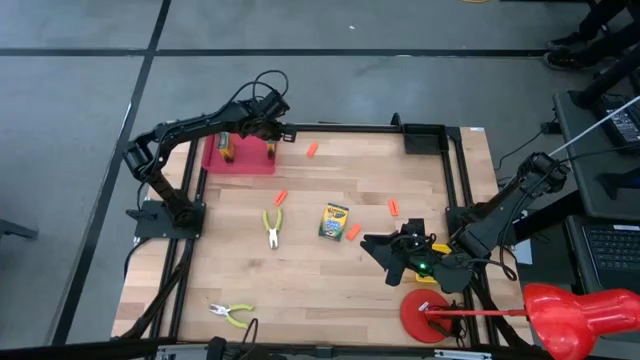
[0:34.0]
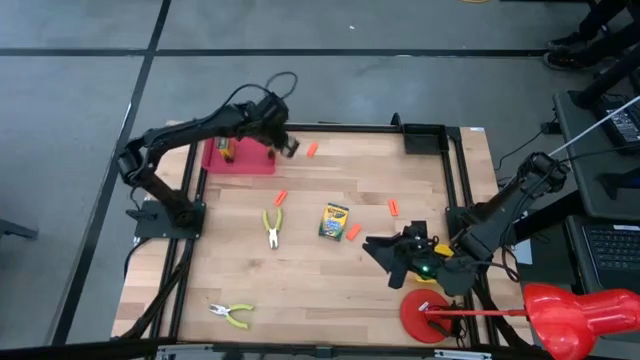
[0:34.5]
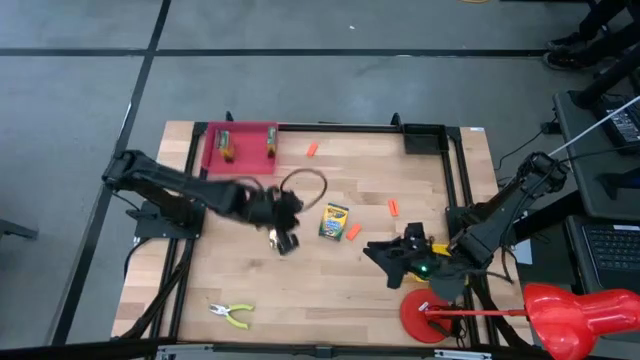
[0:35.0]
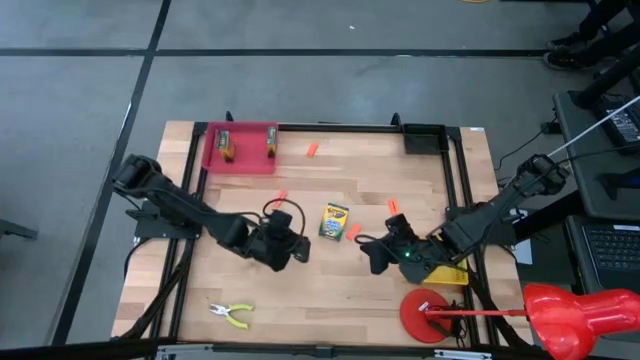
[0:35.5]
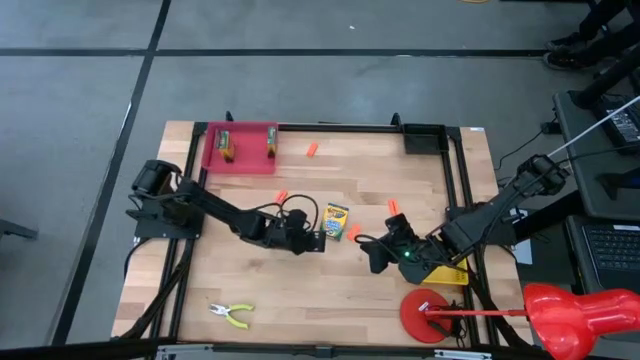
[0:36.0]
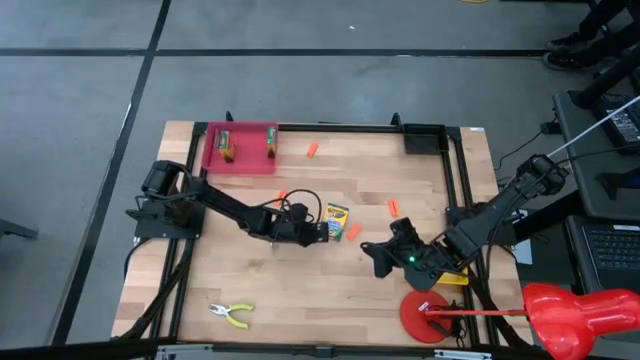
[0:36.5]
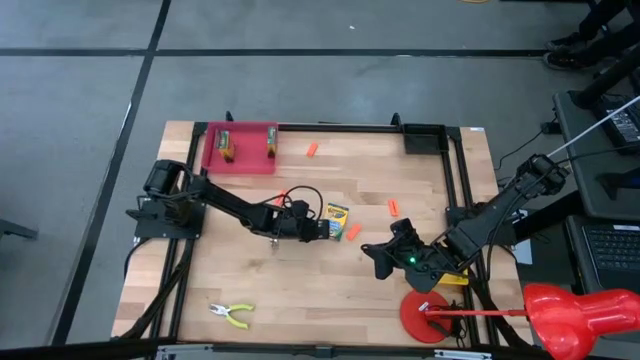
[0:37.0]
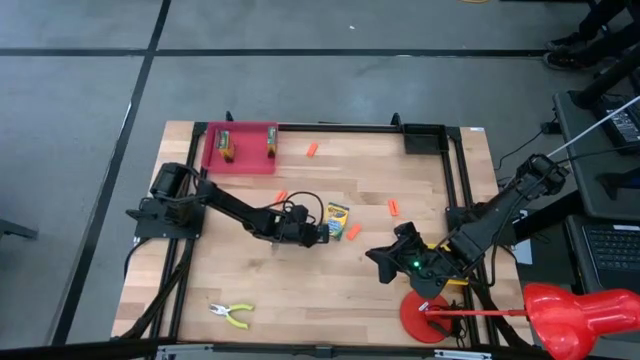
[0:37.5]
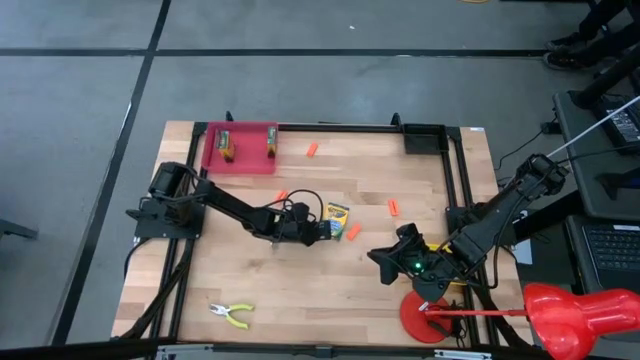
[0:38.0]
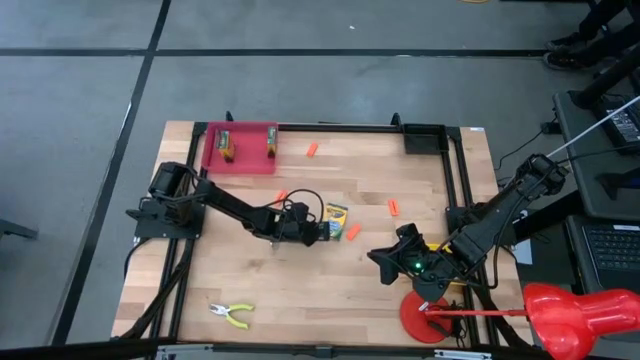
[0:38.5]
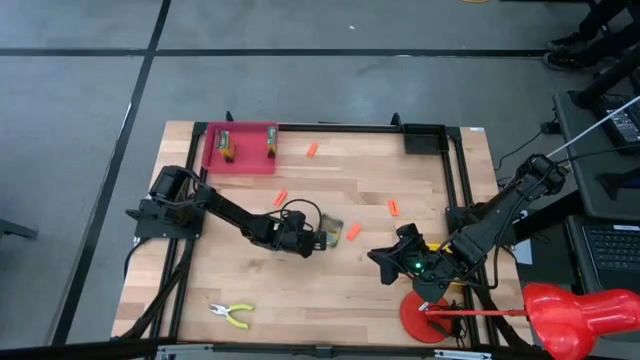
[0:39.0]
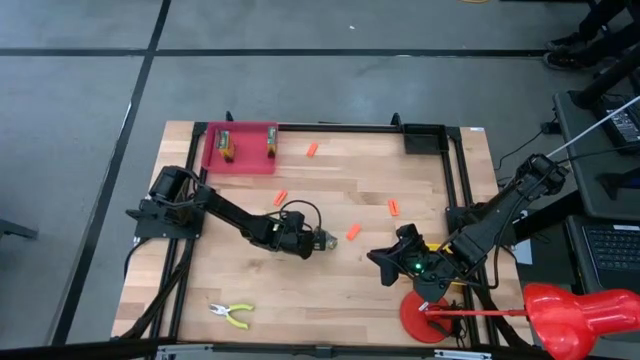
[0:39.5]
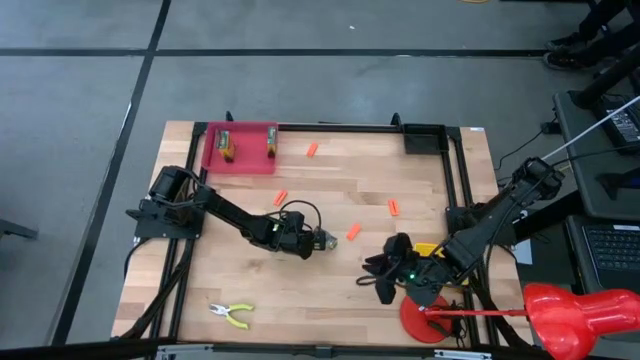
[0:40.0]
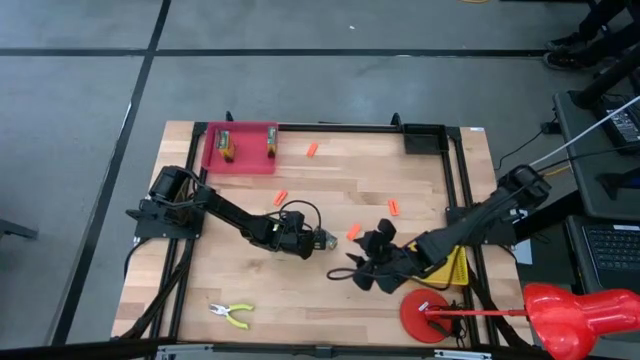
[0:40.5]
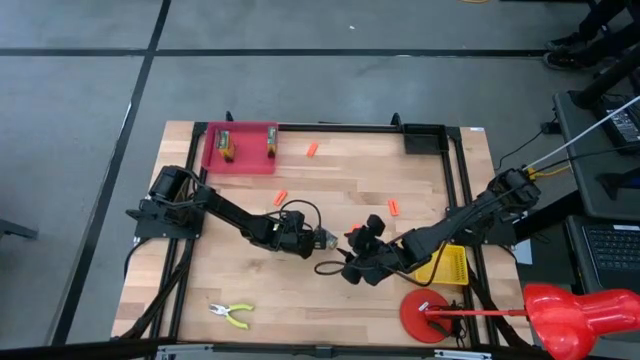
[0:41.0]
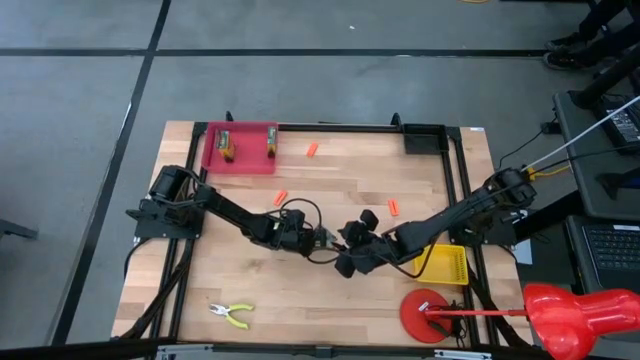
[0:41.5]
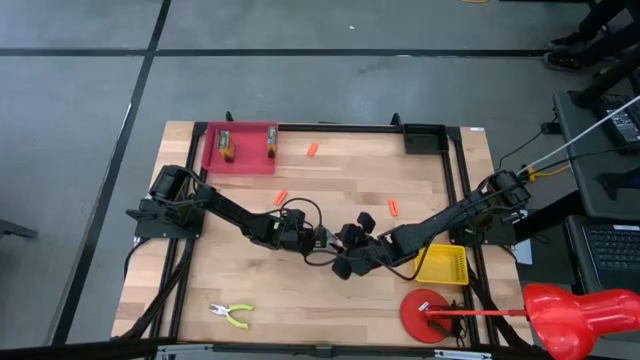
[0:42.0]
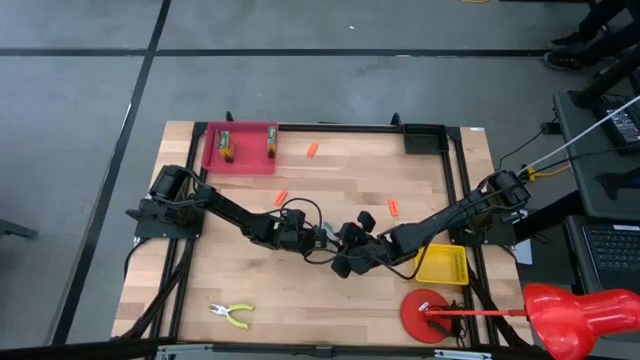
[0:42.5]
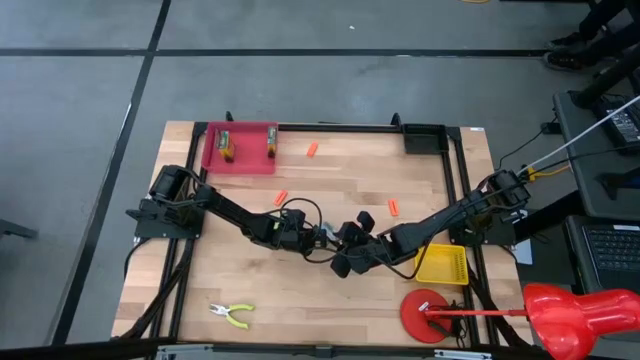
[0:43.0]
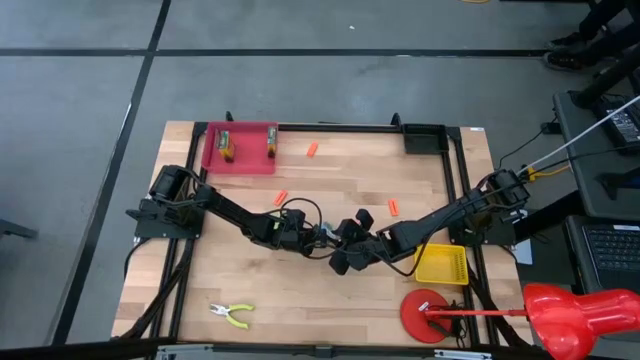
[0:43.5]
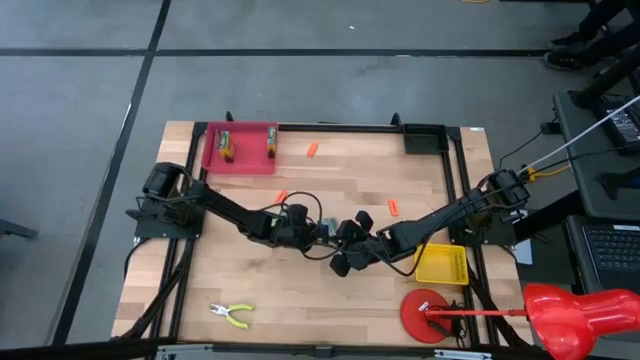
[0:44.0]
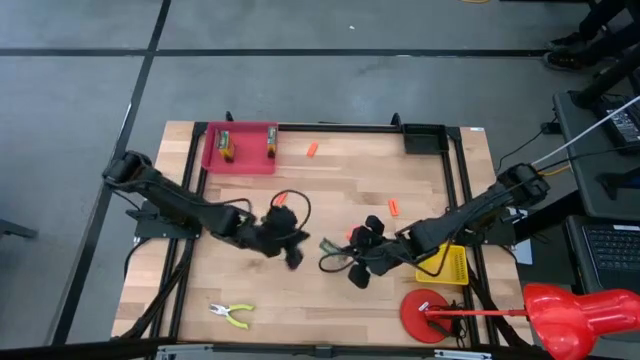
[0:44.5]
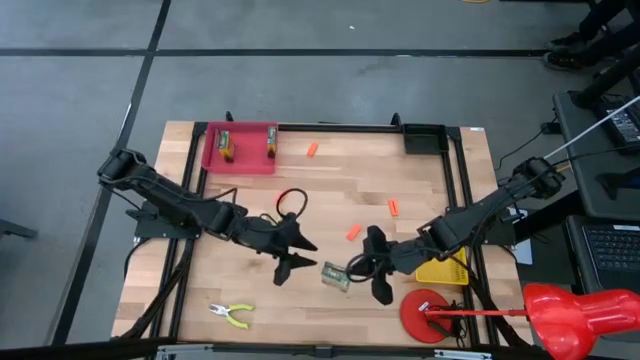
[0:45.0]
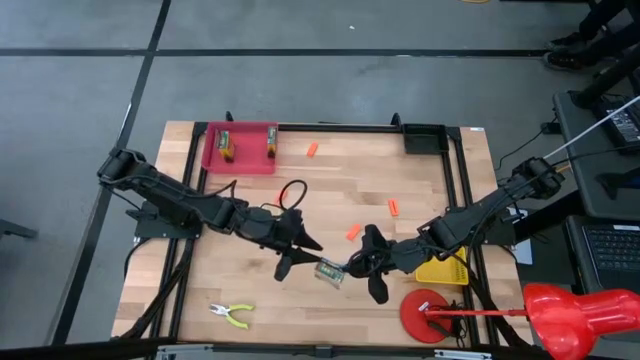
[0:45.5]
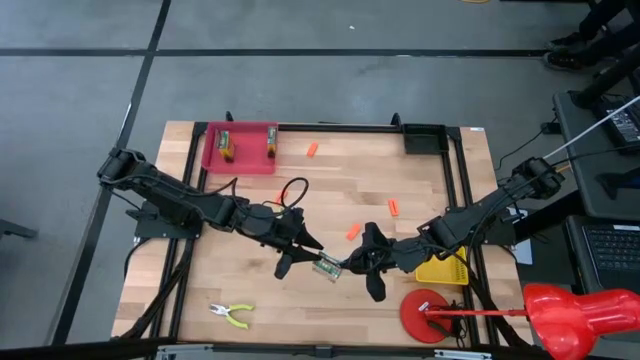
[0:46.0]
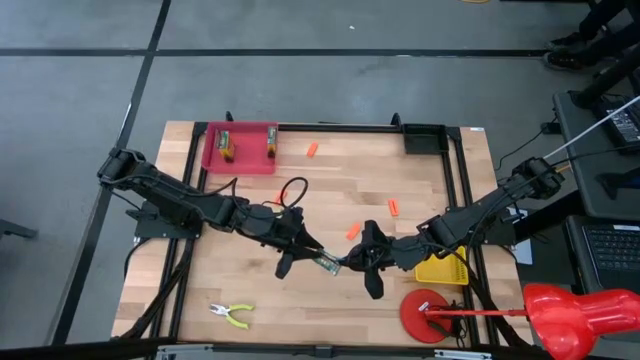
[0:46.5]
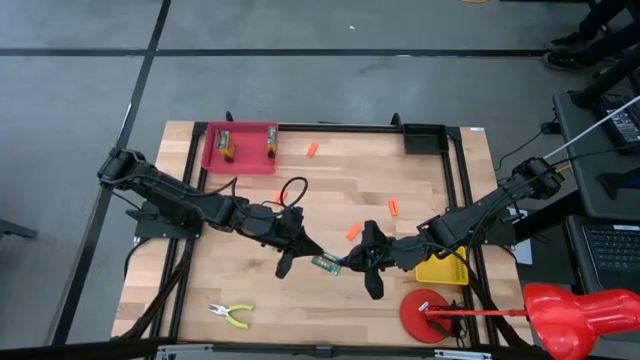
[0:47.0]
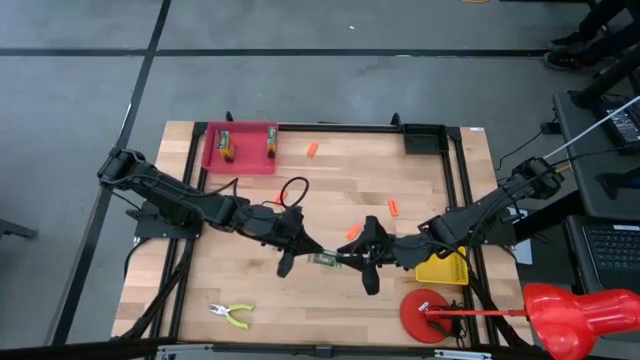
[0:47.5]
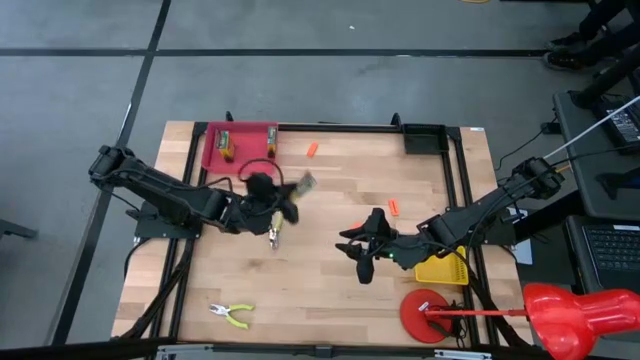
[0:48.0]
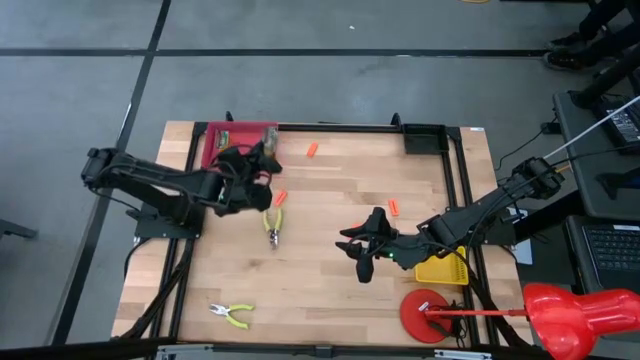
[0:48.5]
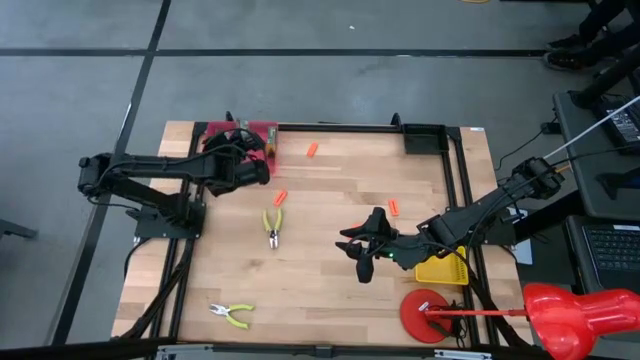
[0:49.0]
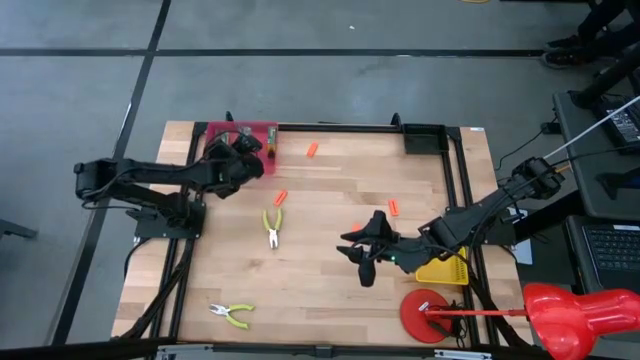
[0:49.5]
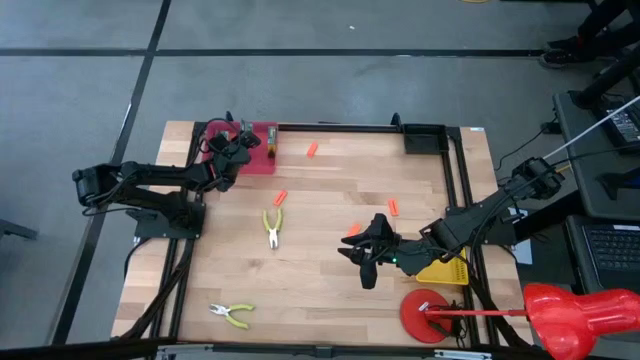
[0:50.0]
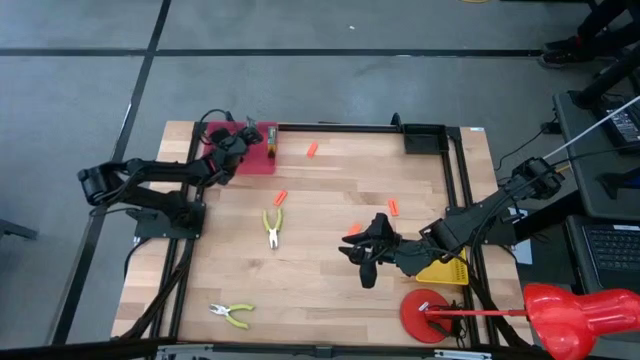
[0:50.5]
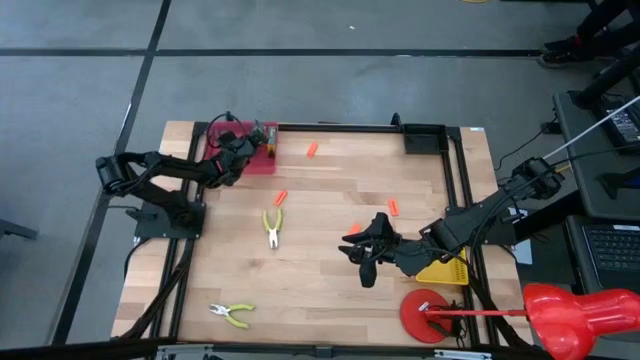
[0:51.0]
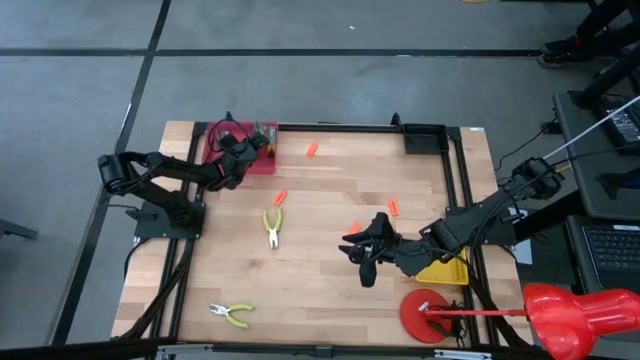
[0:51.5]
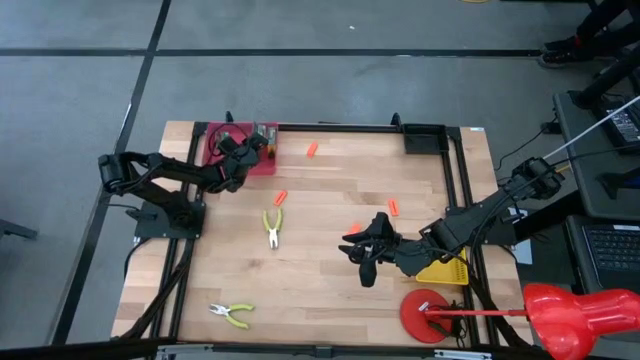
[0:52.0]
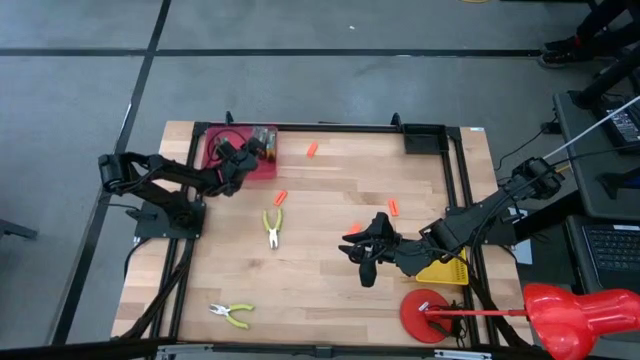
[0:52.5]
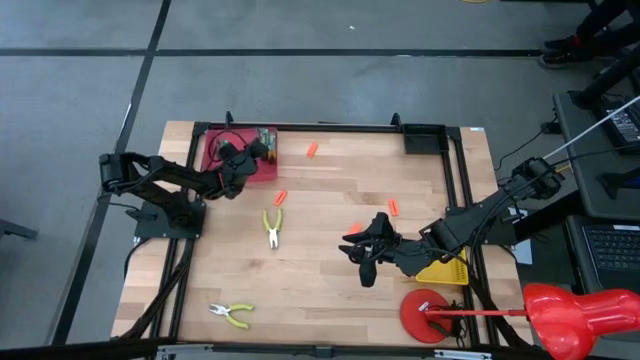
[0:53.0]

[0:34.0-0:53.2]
Task: Pick & Place School Supplies
Put the yellow crayon box into the pink bin

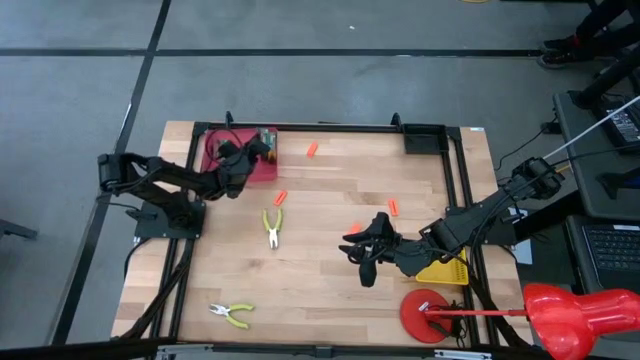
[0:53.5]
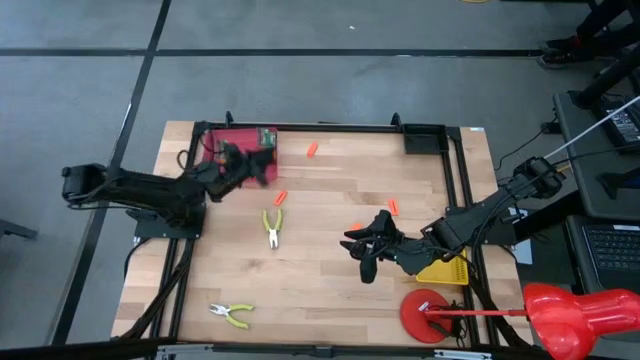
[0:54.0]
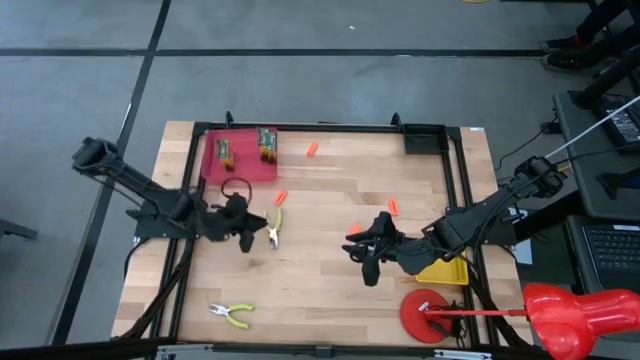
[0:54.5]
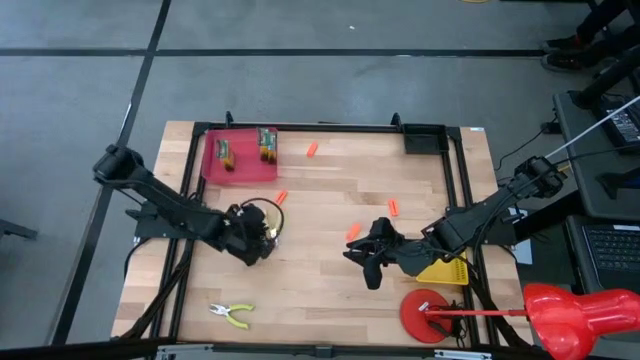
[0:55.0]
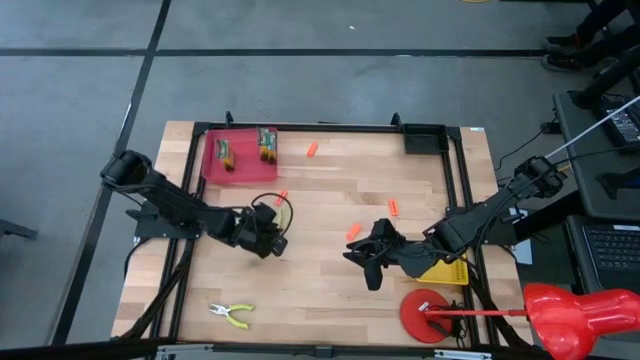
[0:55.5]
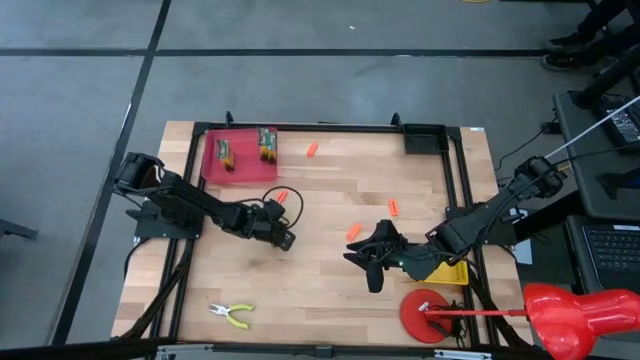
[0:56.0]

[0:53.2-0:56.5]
Put the green hole puncher into the yellow bin
